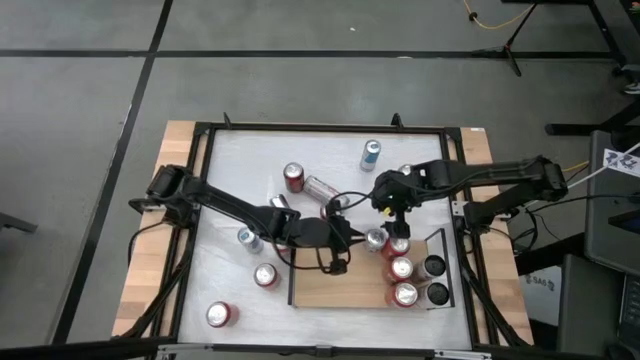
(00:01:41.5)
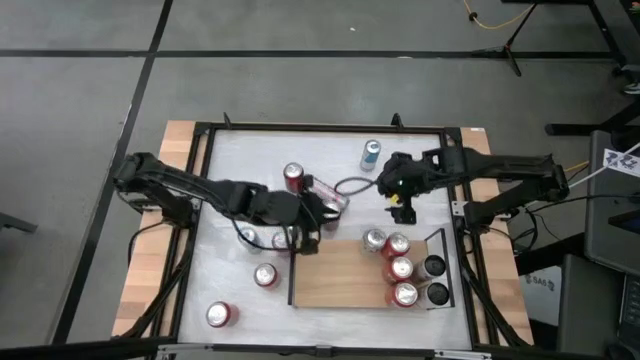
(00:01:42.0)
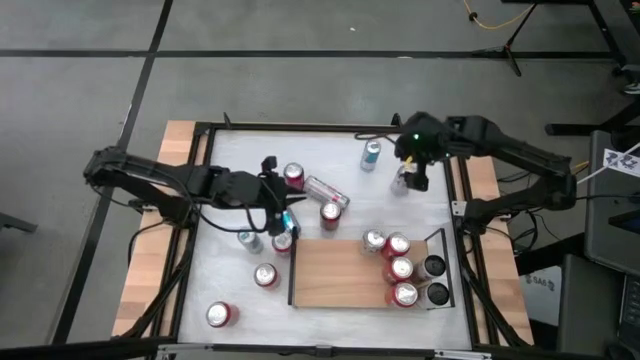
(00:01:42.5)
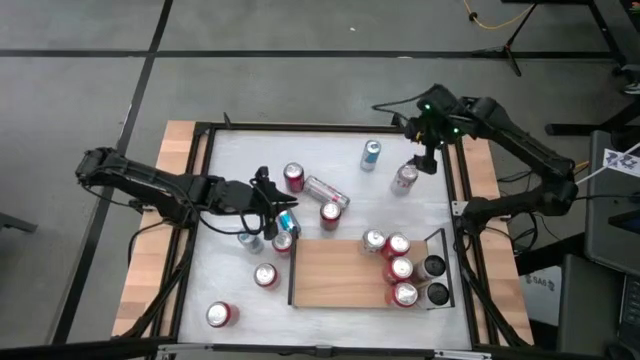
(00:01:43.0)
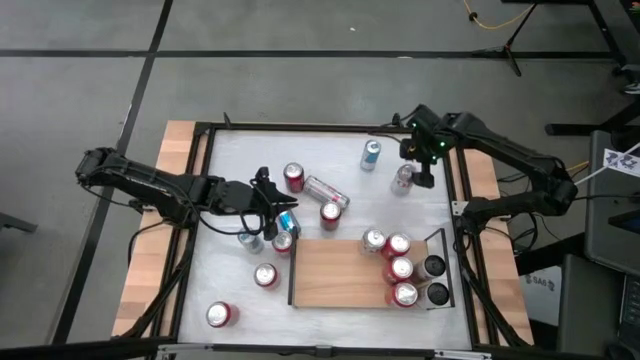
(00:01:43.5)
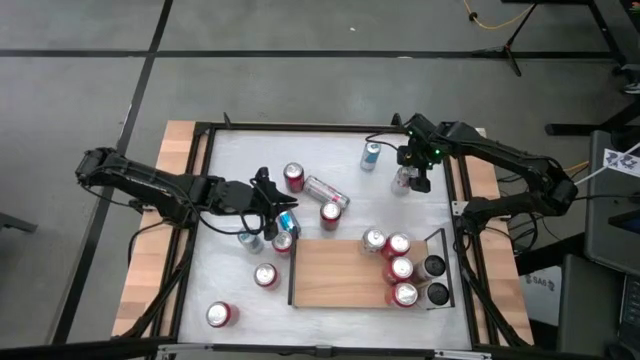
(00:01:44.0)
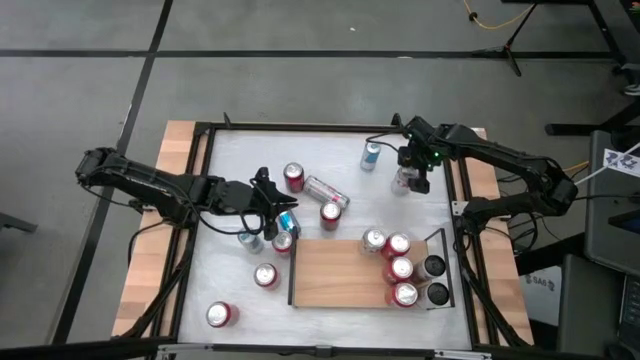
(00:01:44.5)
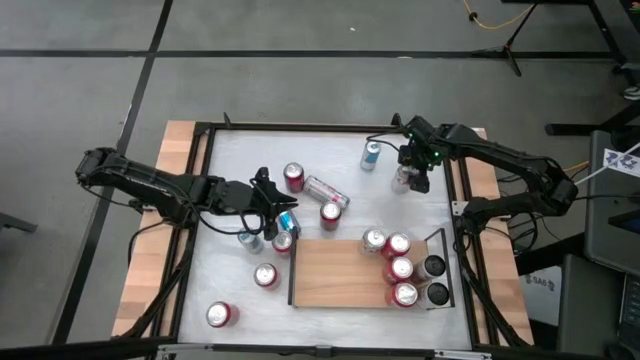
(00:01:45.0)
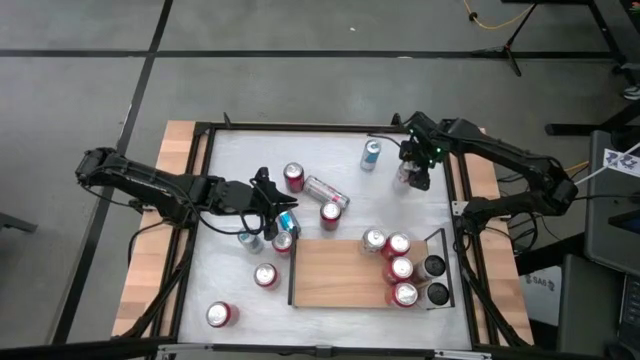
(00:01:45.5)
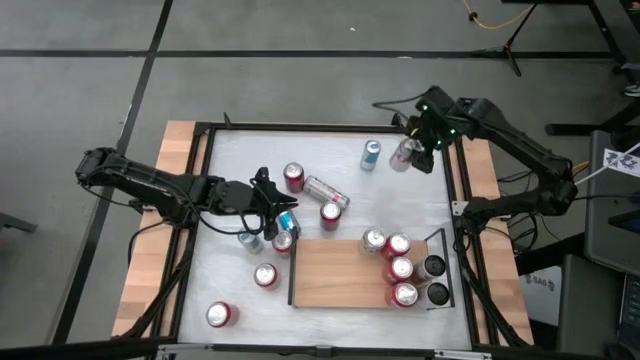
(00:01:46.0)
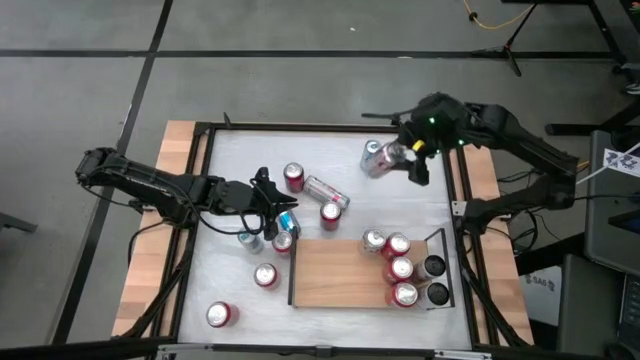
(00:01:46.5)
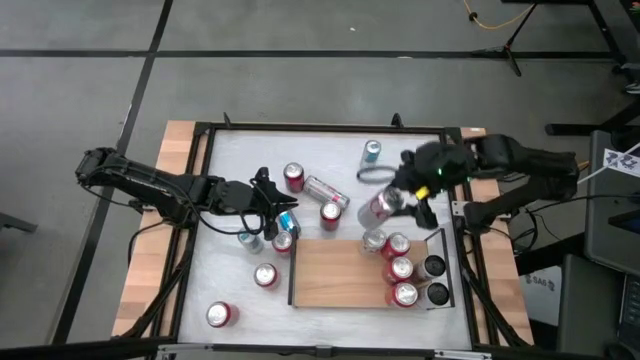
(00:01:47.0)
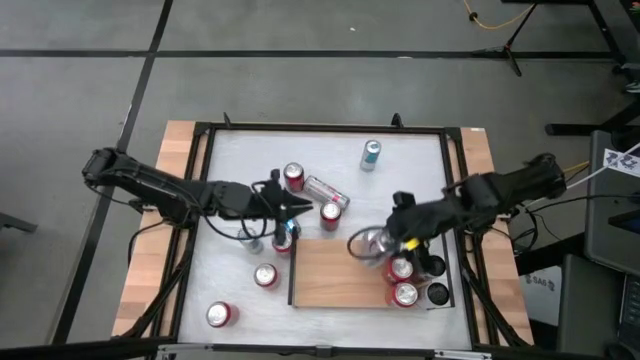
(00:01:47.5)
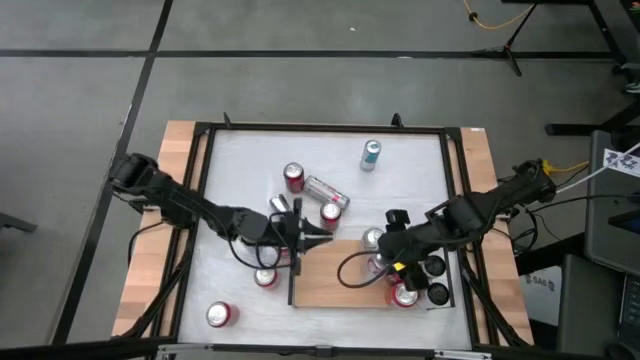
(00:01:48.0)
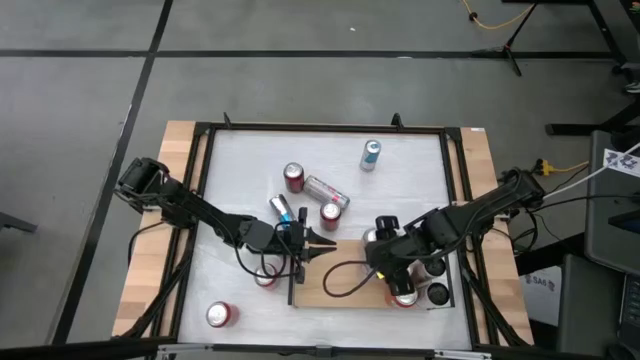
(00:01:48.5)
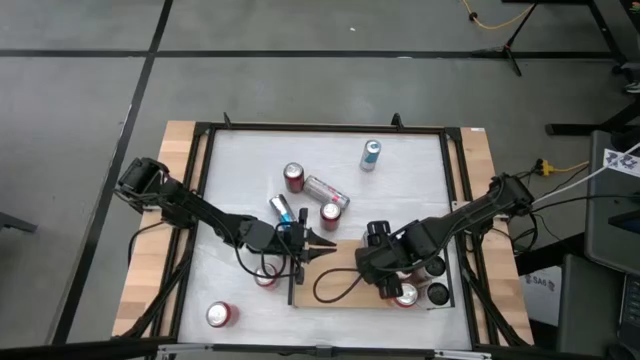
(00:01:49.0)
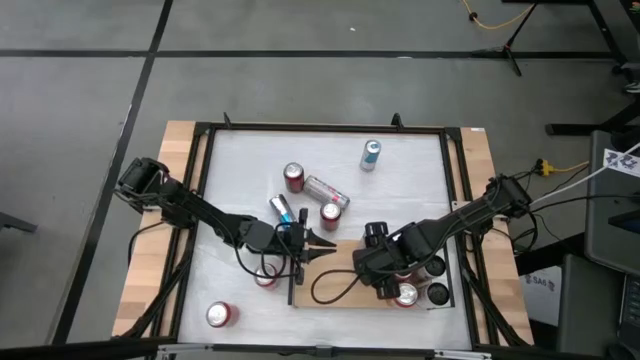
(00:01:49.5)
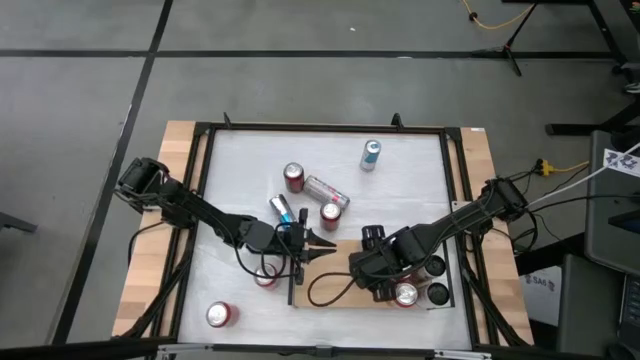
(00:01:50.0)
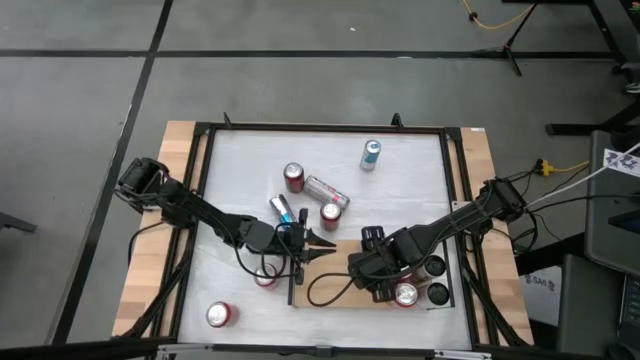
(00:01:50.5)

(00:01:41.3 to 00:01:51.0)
Task: Place canned beverage on shelf
Put the right silver soda can on the shelf

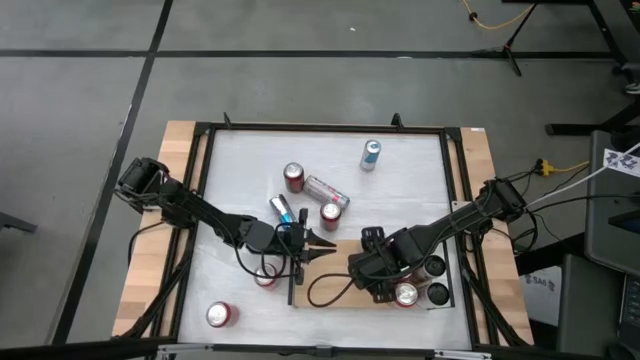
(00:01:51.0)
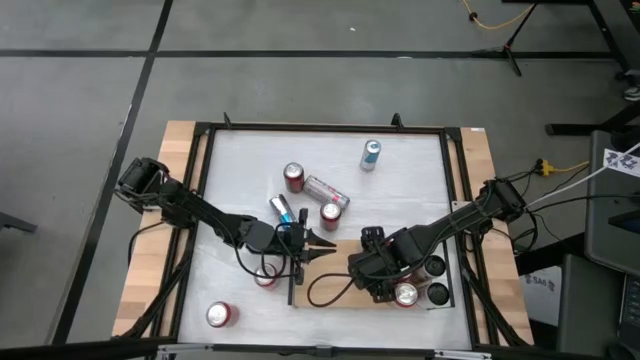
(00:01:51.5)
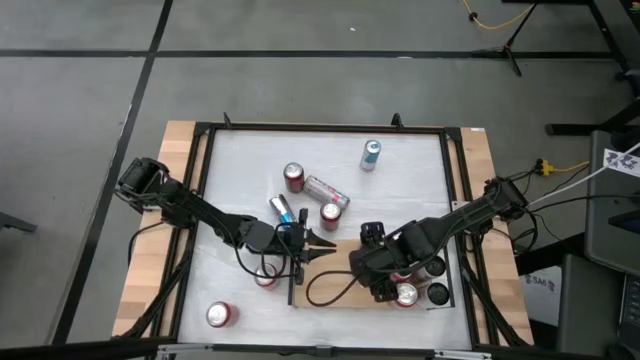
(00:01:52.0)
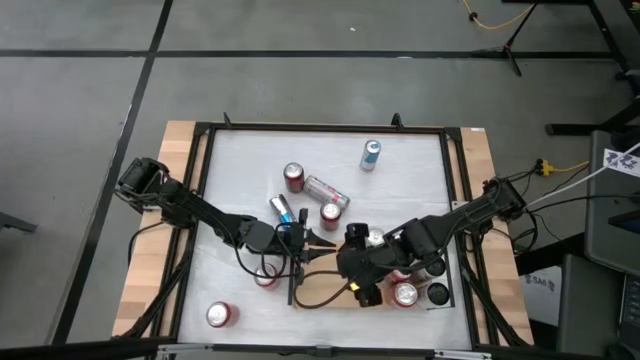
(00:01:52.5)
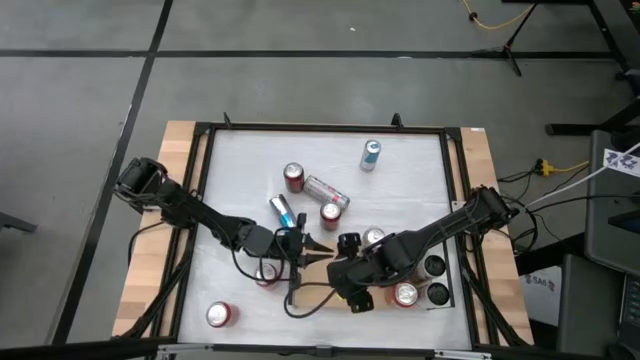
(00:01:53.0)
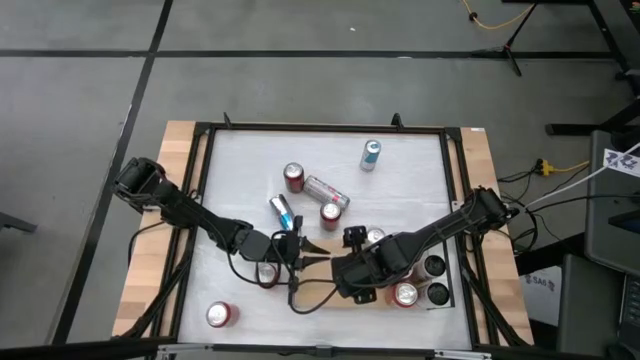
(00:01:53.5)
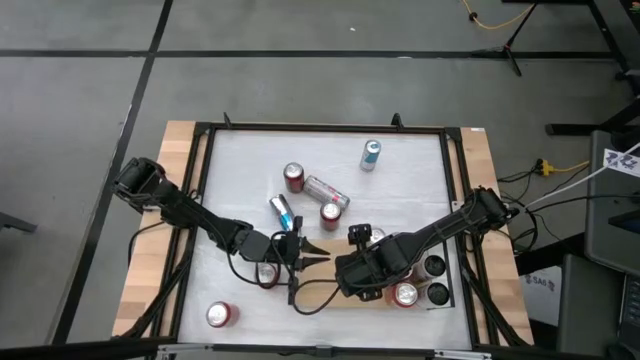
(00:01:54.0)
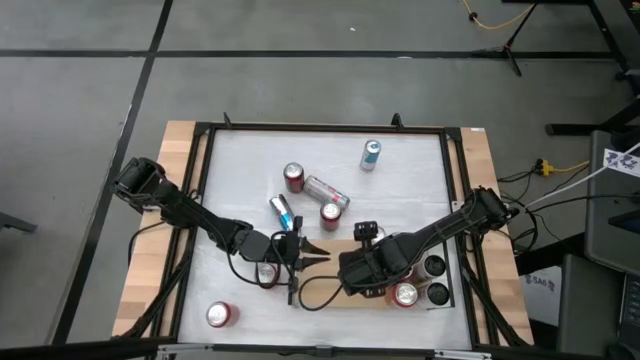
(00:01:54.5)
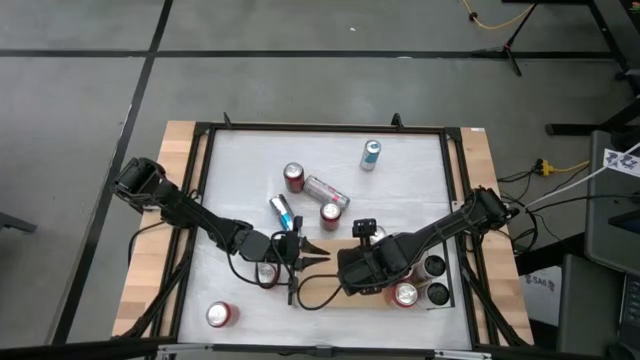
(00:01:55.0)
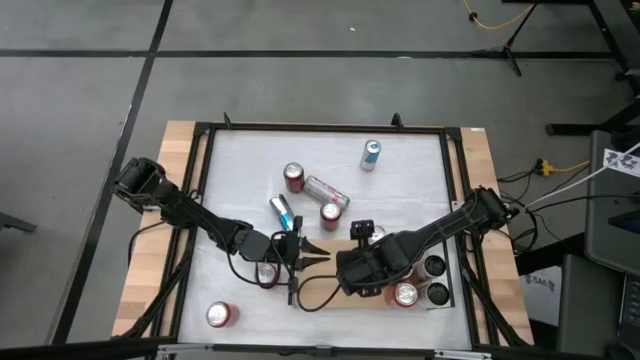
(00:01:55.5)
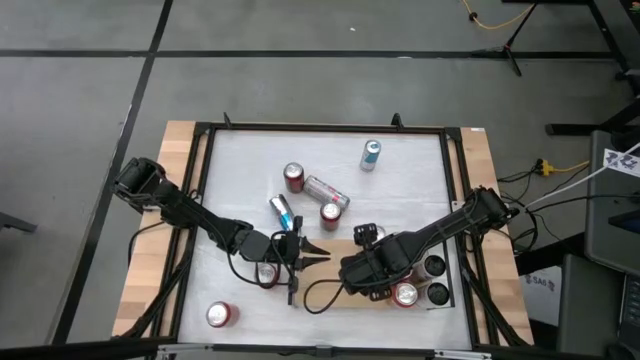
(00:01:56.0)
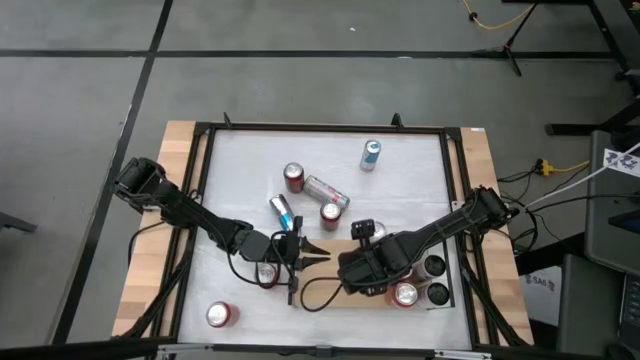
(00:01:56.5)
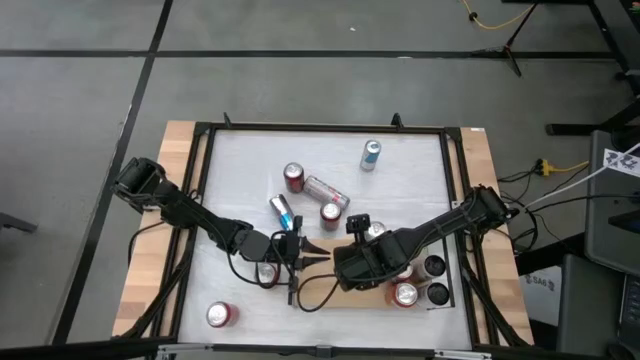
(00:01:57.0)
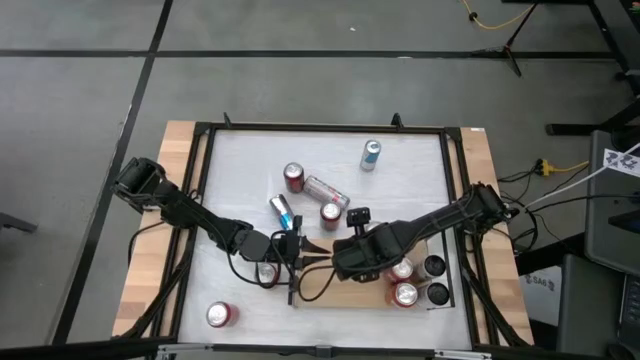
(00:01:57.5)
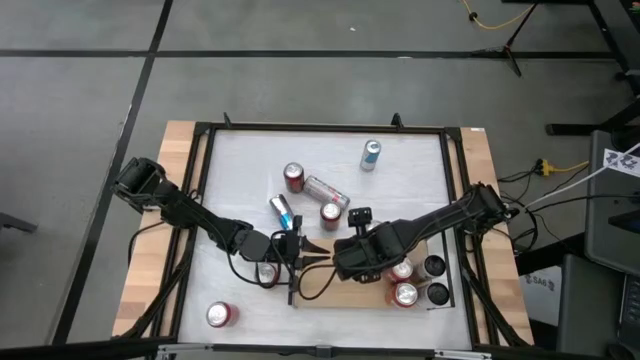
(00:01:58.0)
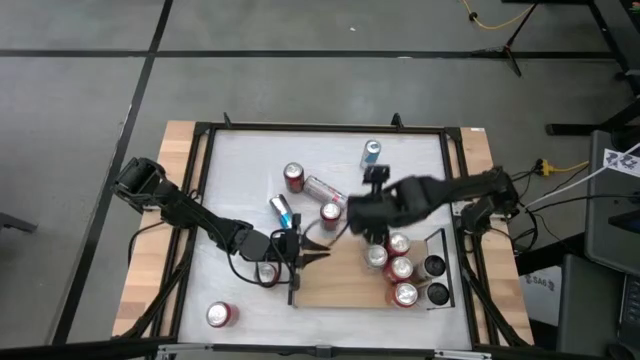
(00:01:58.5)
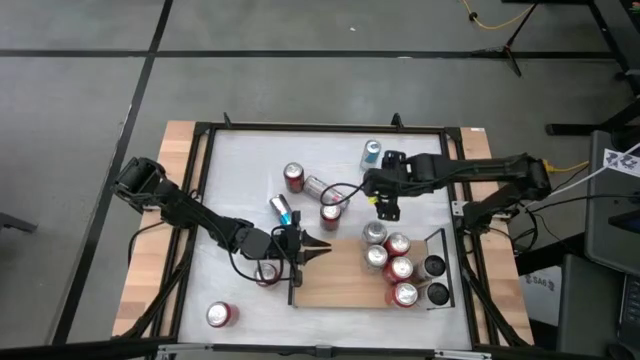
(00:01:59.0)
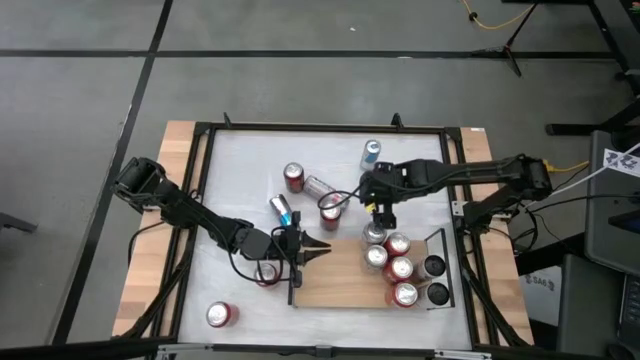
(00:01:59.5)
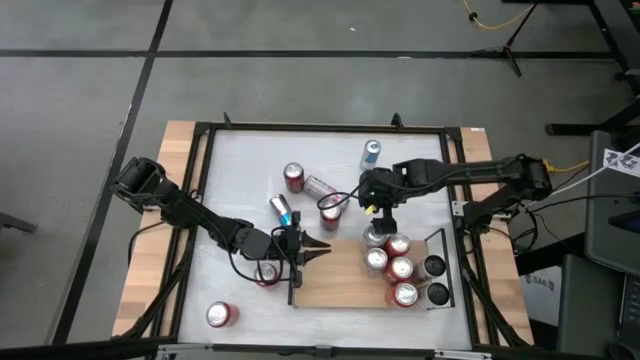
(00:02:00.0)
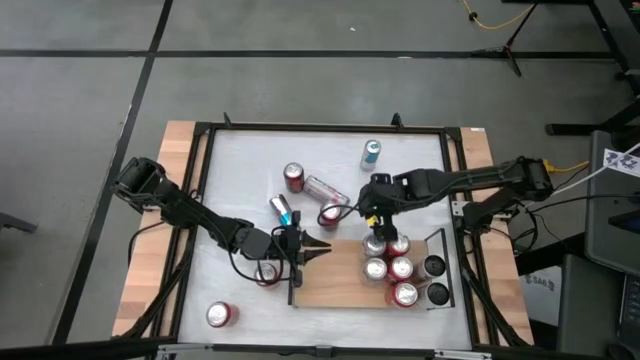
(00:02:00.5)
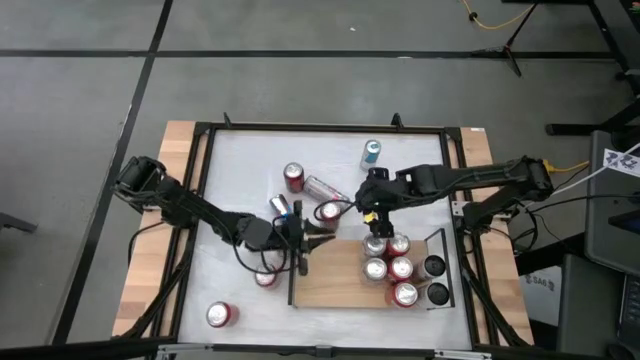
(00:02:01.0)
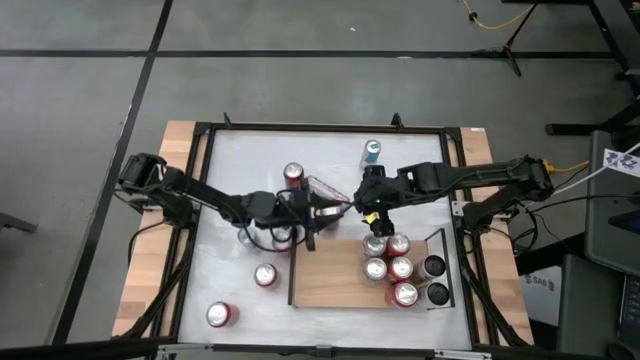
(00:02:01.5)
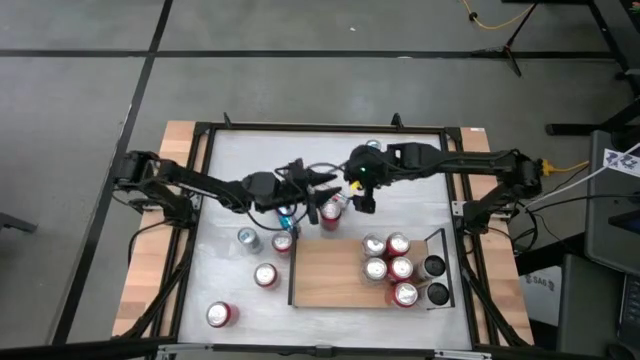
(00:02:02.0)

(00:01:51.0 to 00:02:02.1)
Adjust the bottom silver soda can on the shelf
